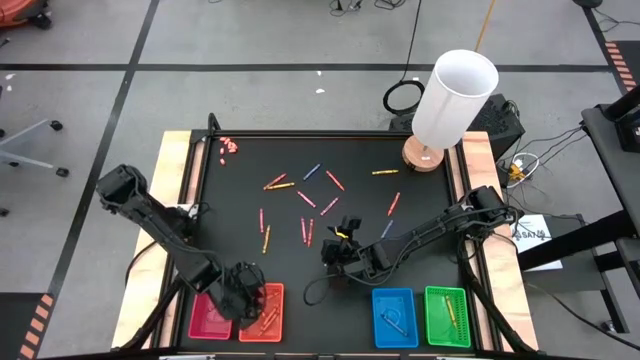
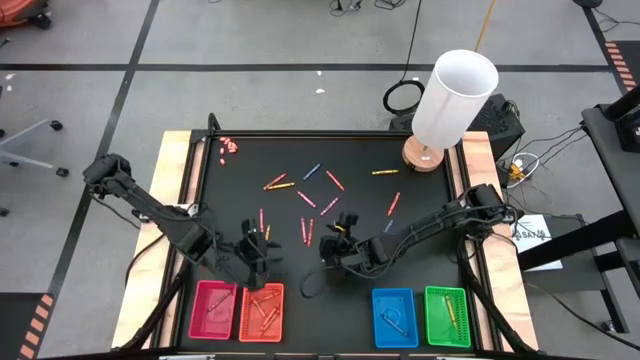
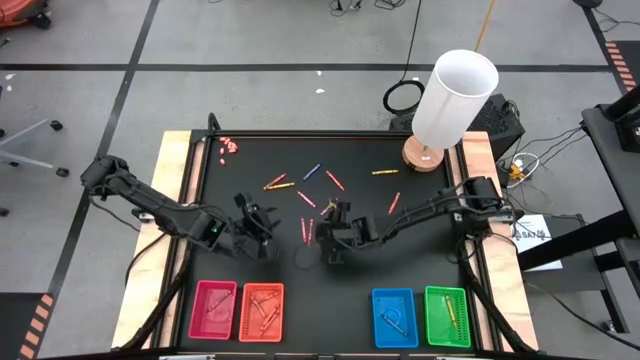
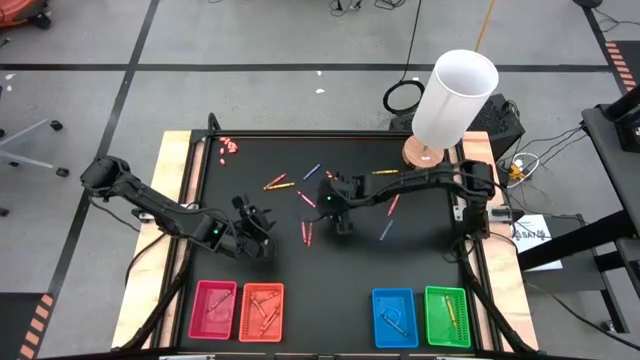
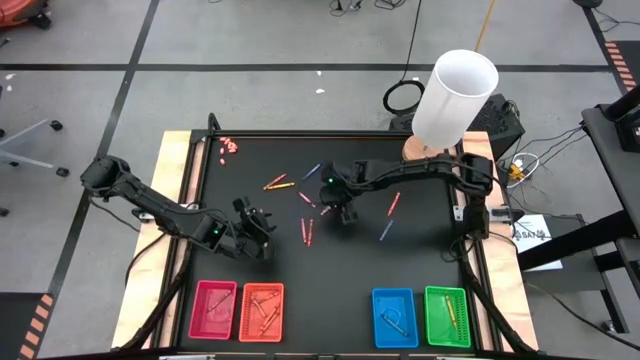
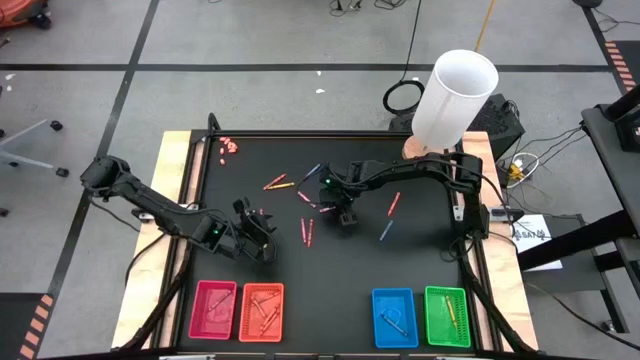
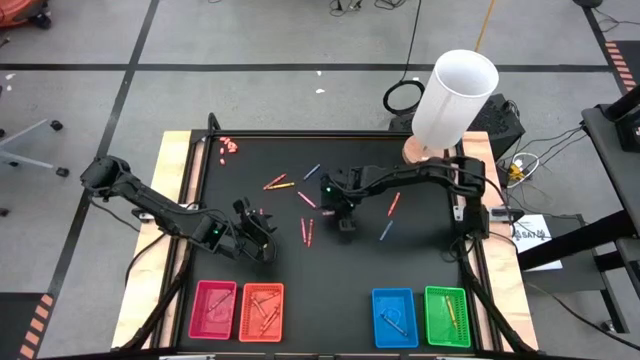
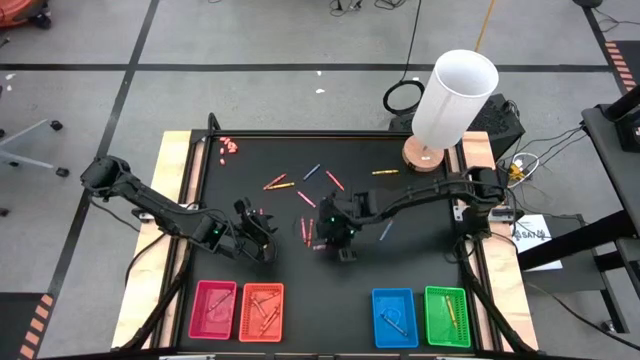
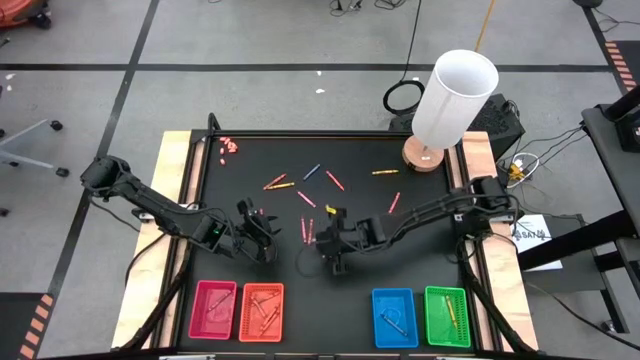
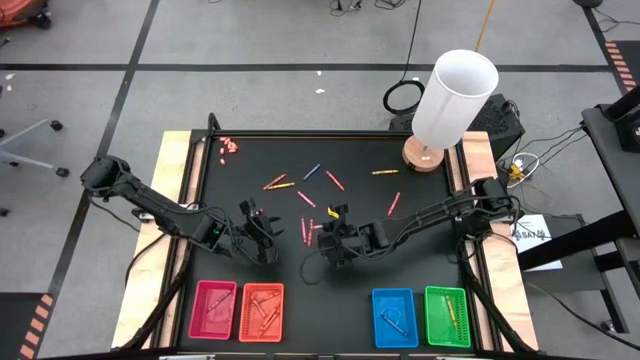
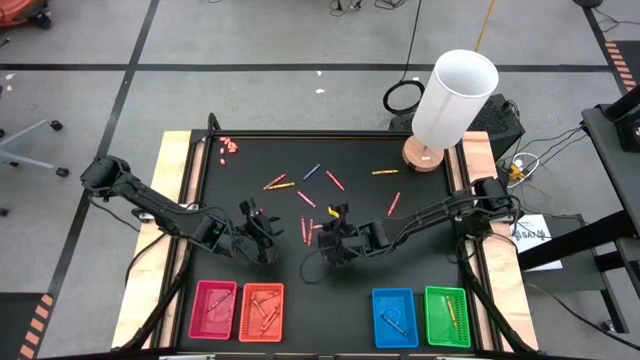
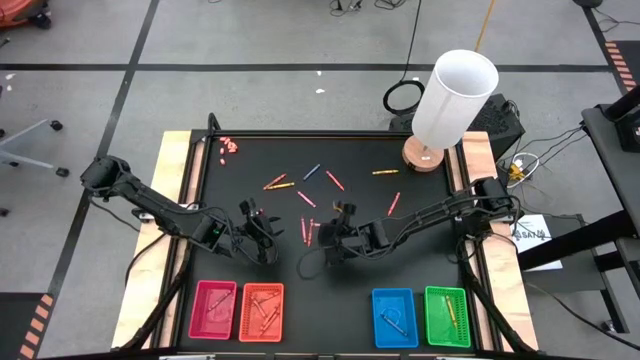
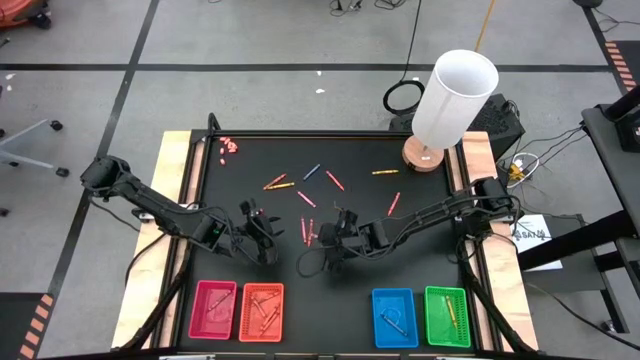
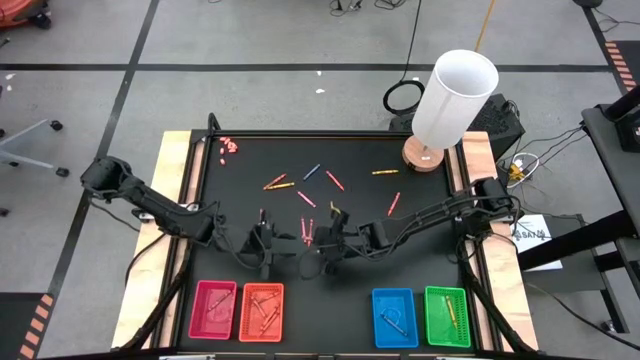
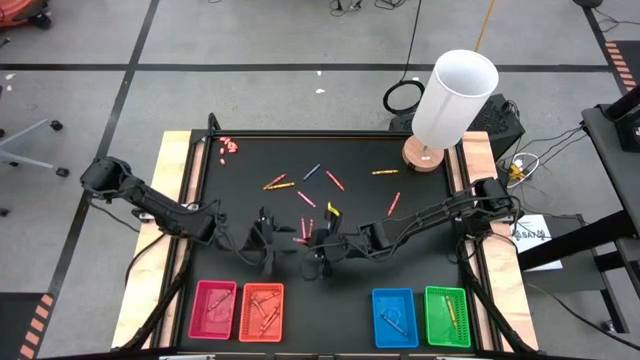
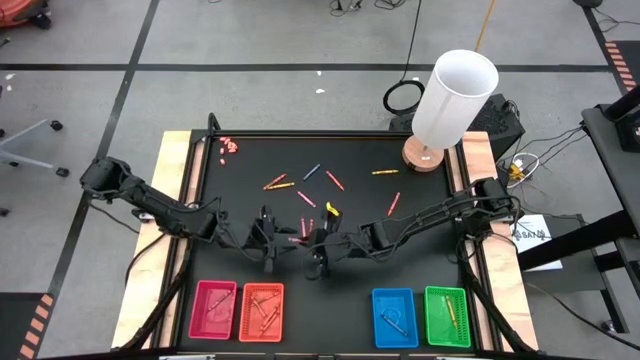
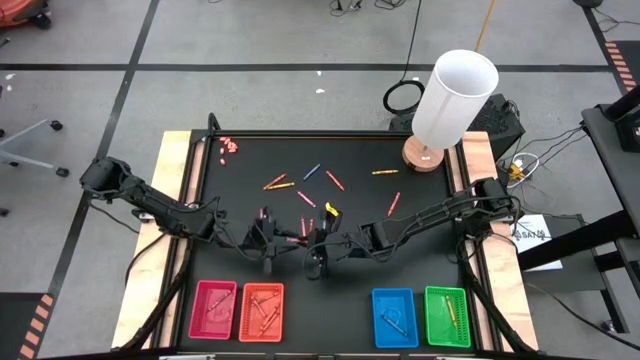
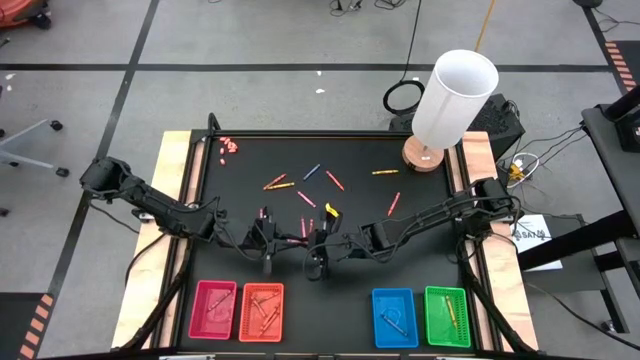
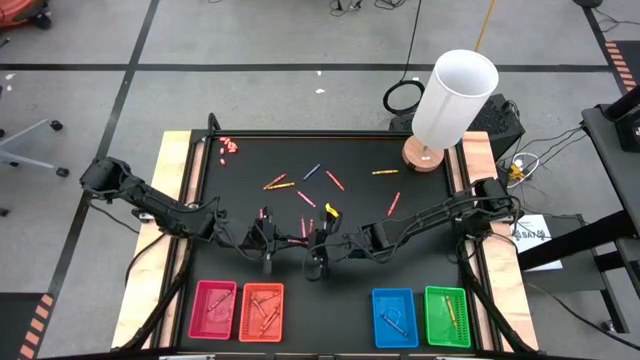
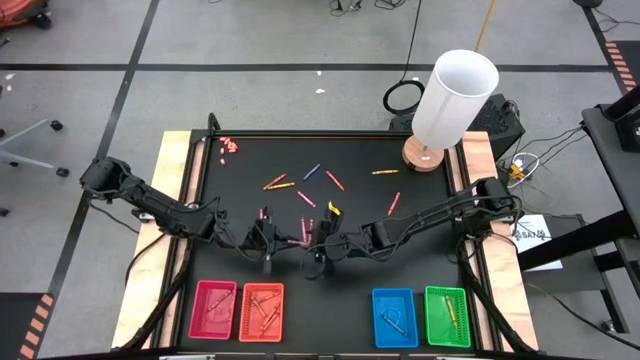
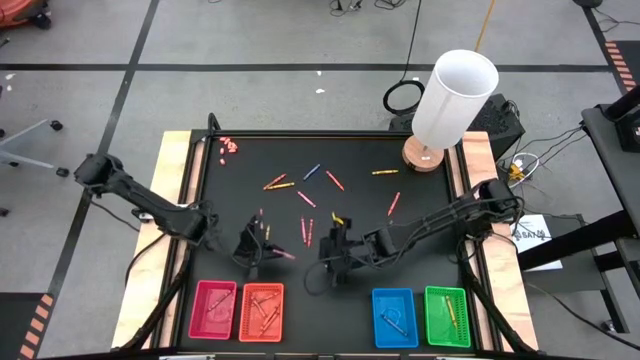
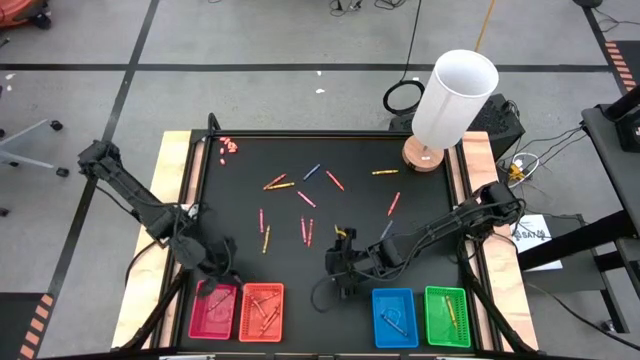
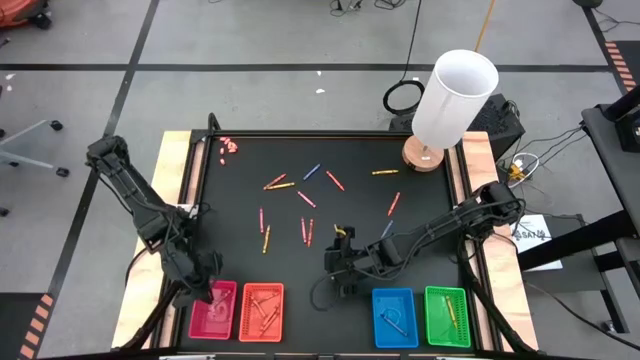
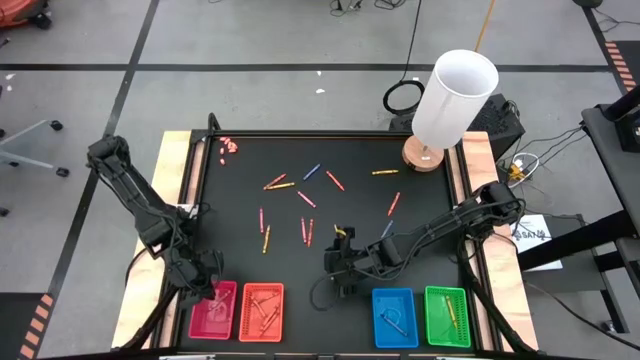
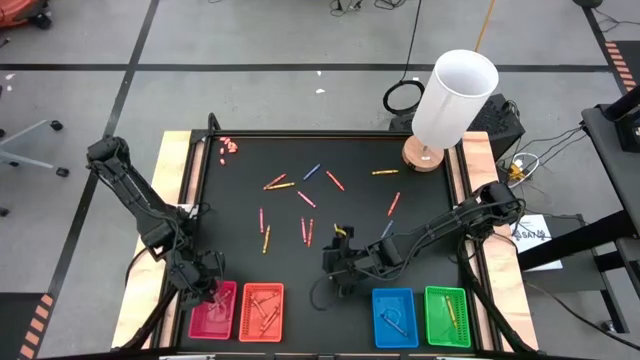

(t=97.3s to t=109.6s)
Task: Sort crayons
Put the red crayon into the red bin

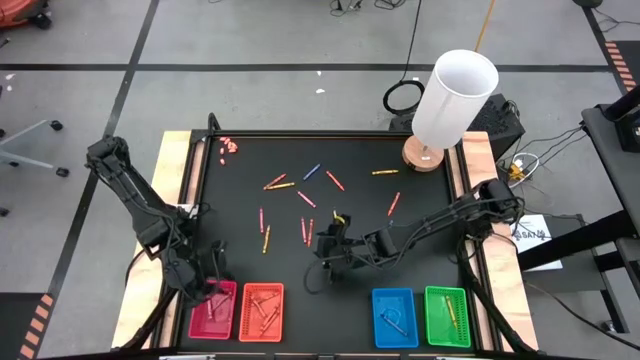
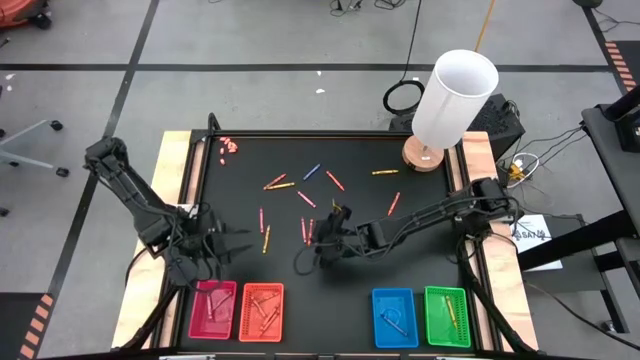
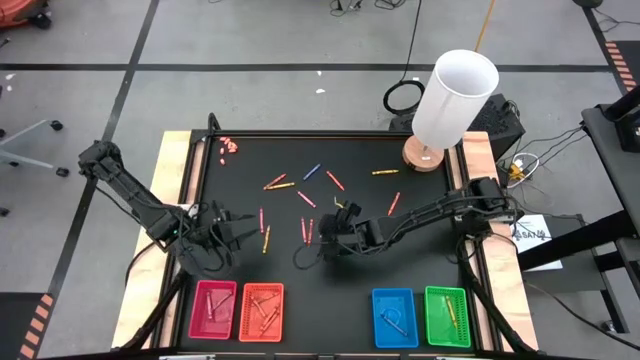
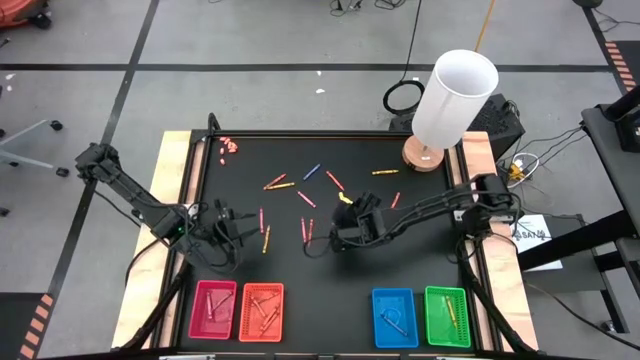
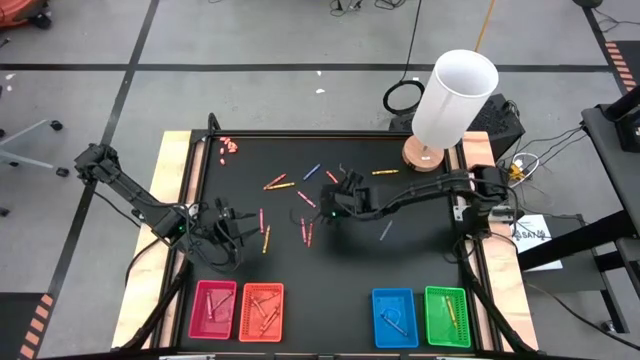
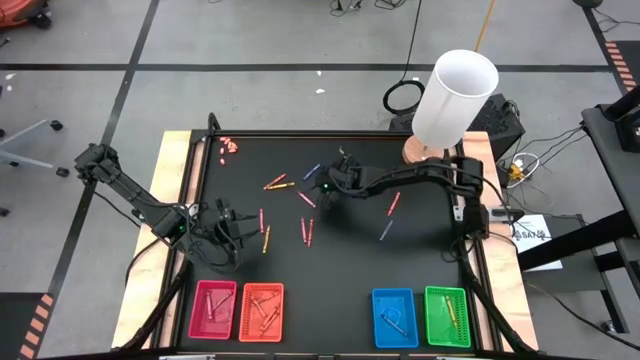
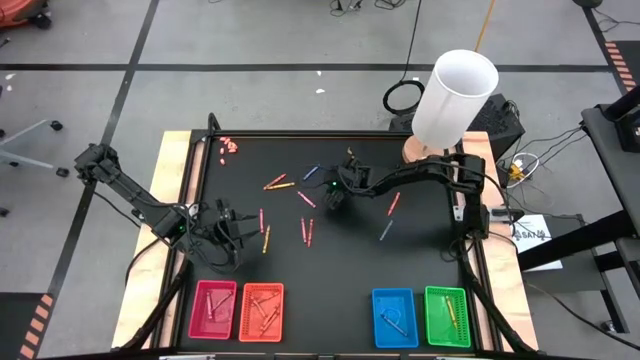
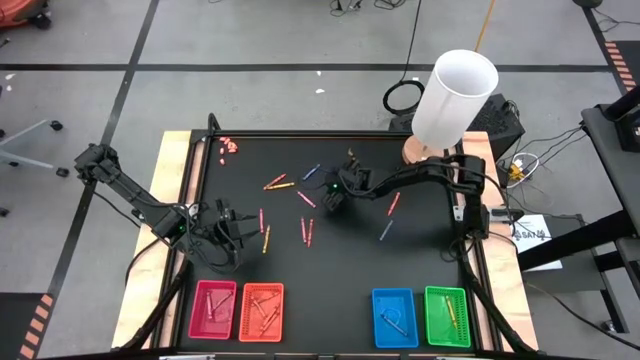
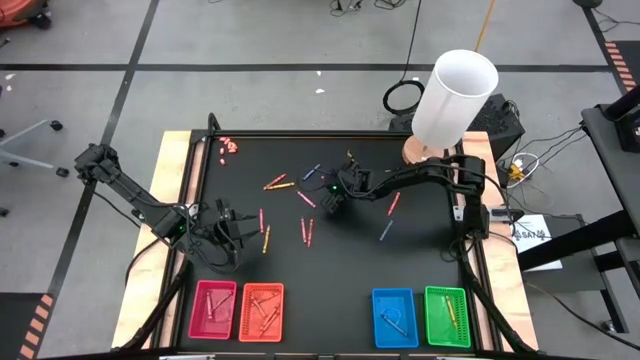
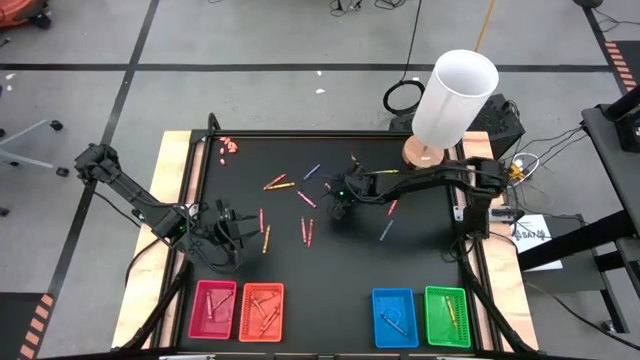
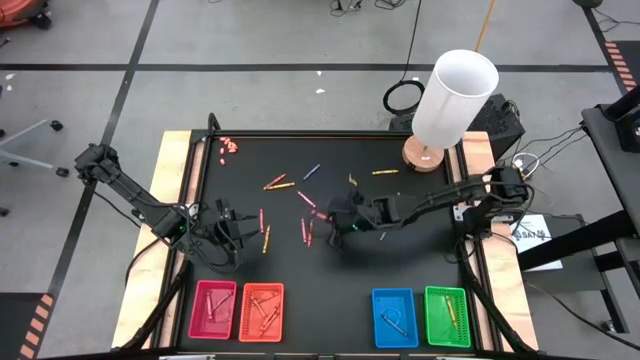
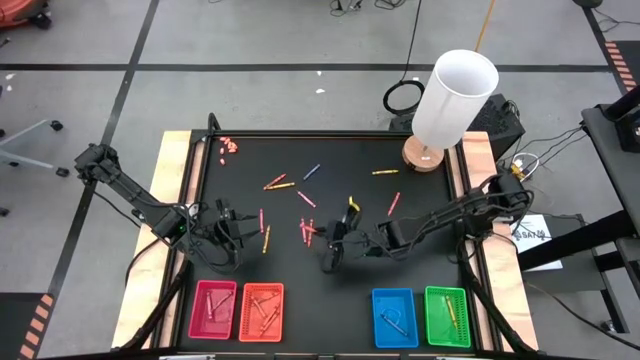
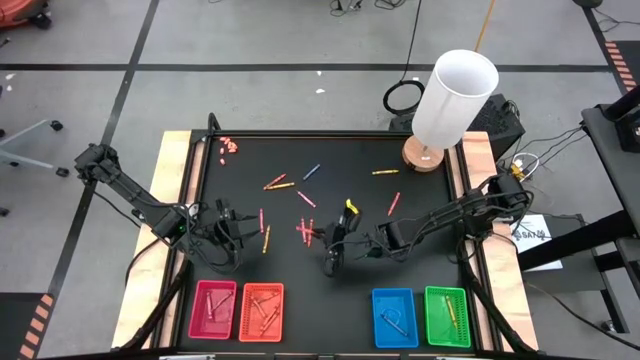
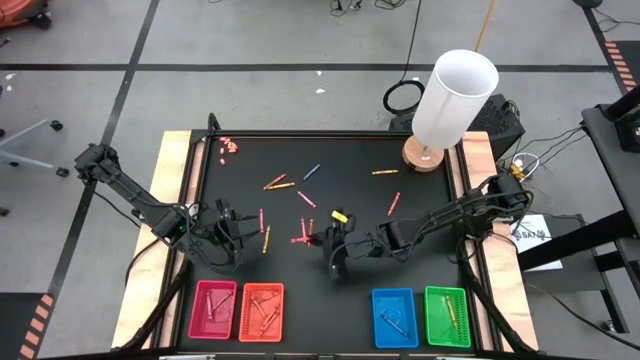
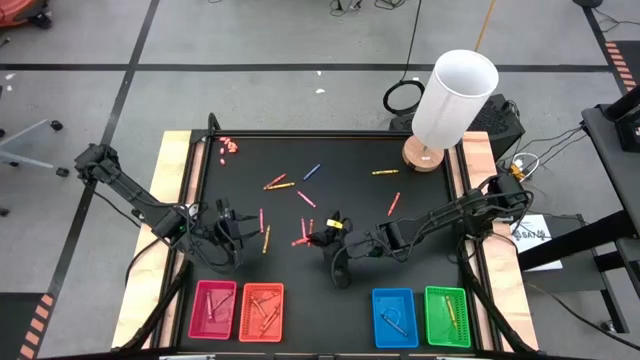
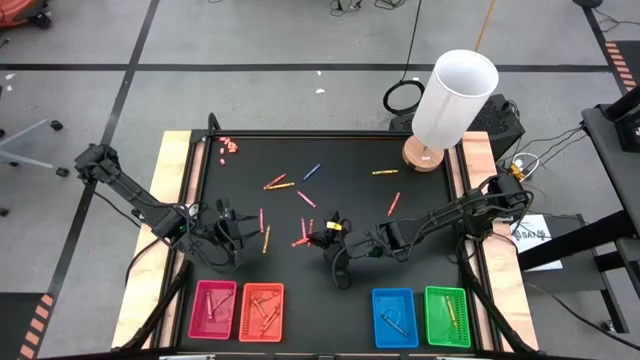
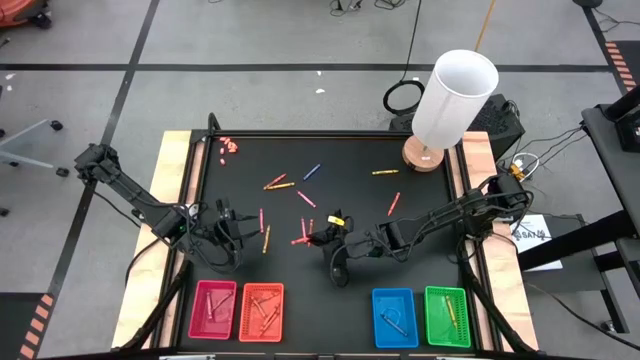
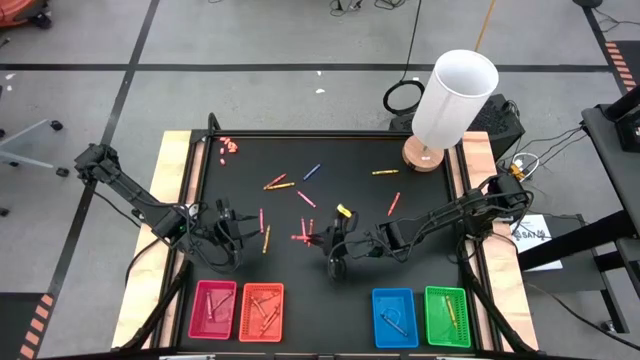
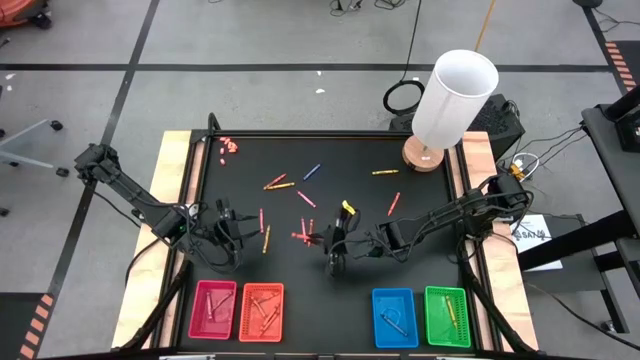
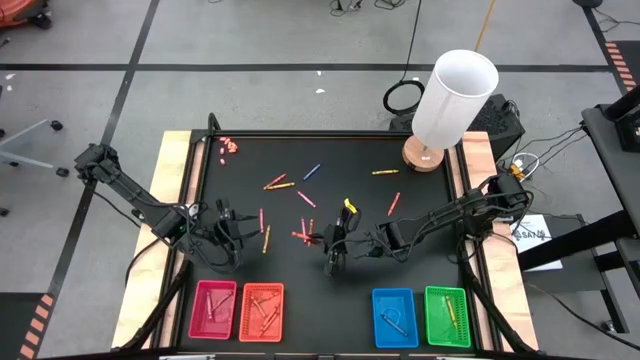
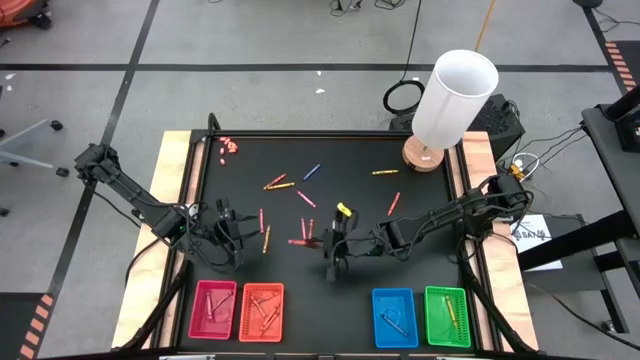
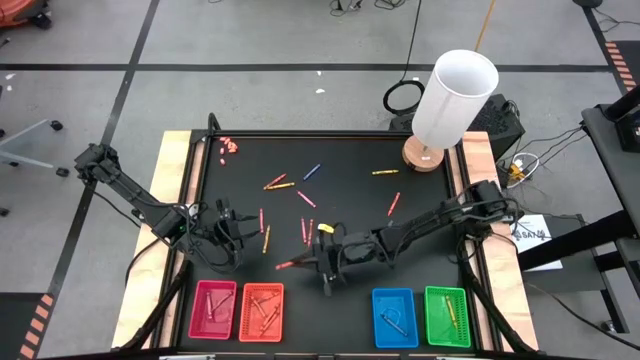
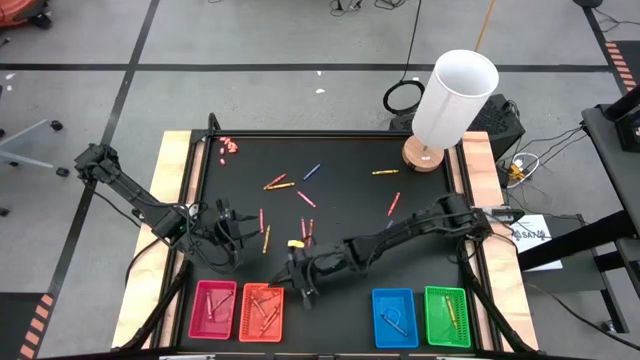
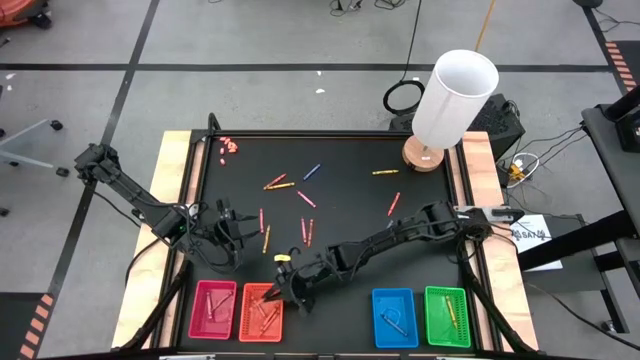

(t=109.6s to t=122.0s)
Put the orange crayon into the orange bin
